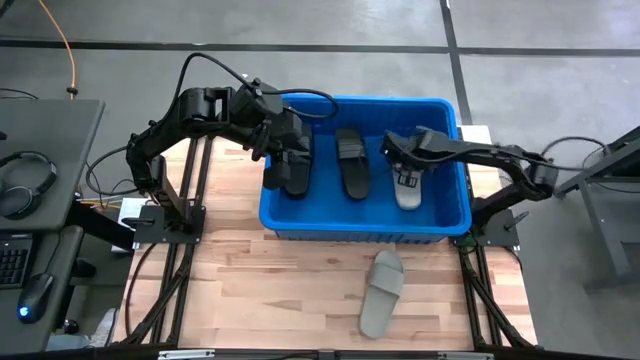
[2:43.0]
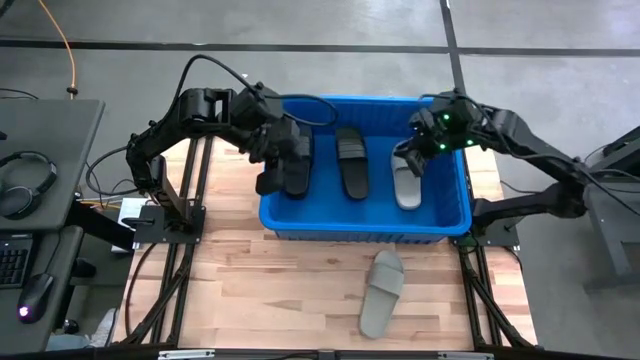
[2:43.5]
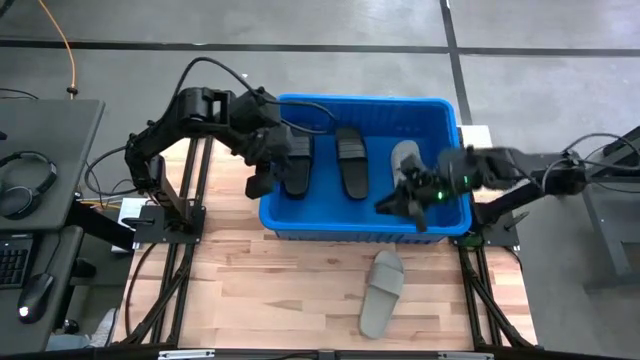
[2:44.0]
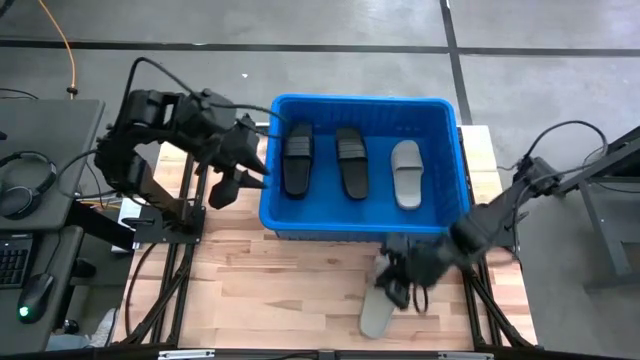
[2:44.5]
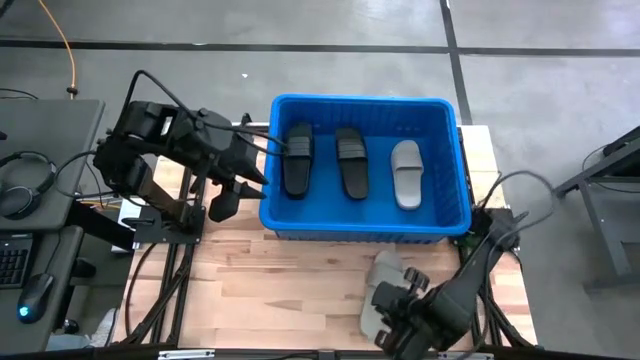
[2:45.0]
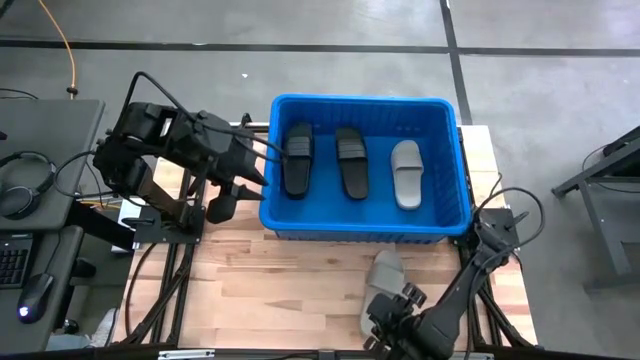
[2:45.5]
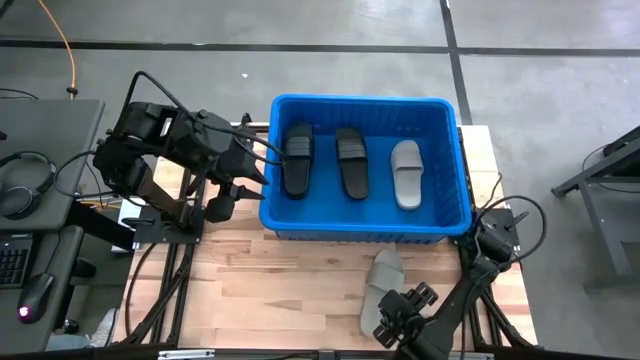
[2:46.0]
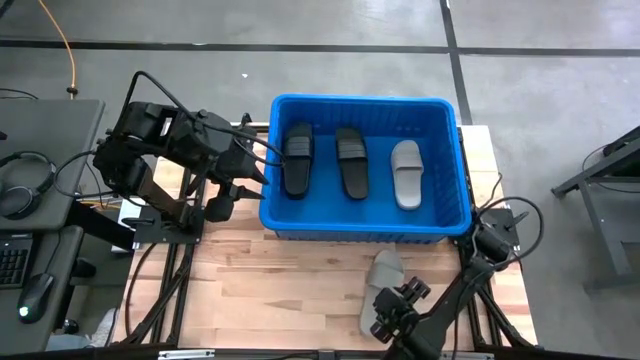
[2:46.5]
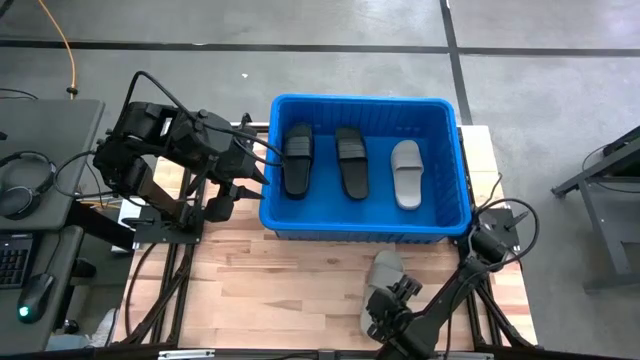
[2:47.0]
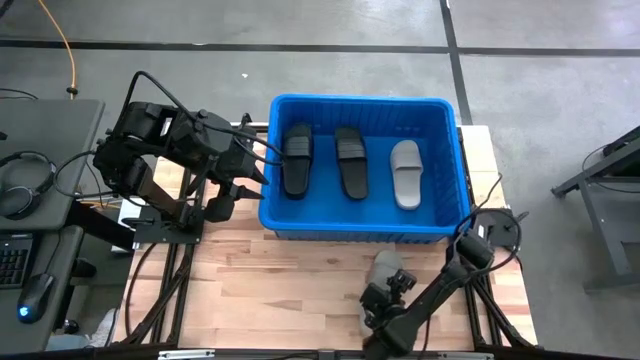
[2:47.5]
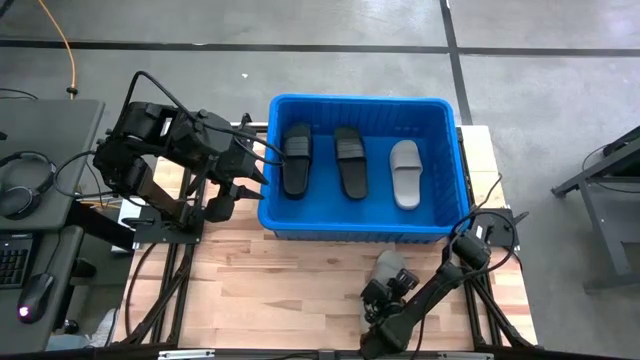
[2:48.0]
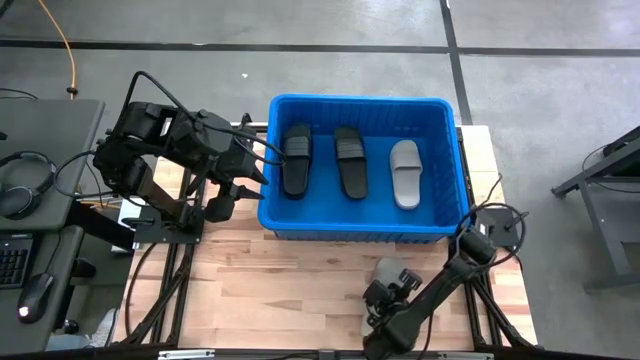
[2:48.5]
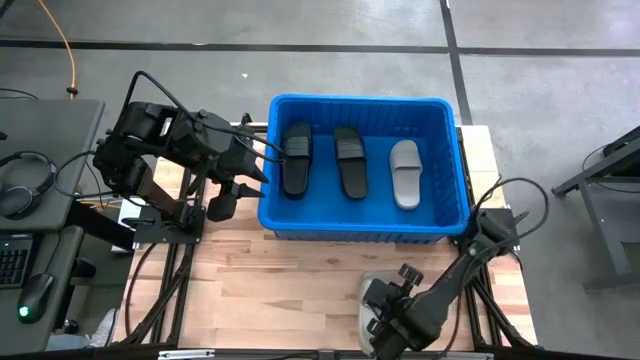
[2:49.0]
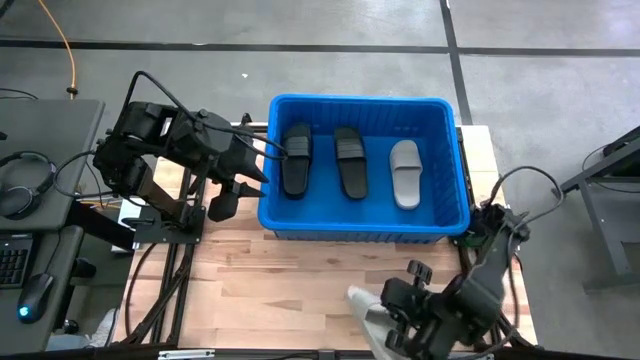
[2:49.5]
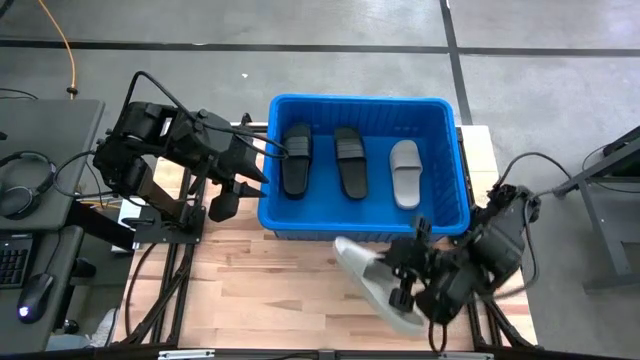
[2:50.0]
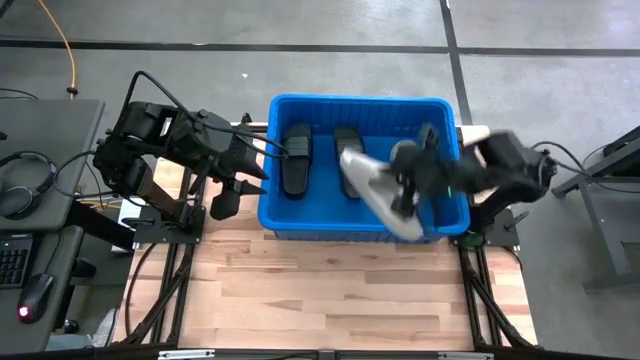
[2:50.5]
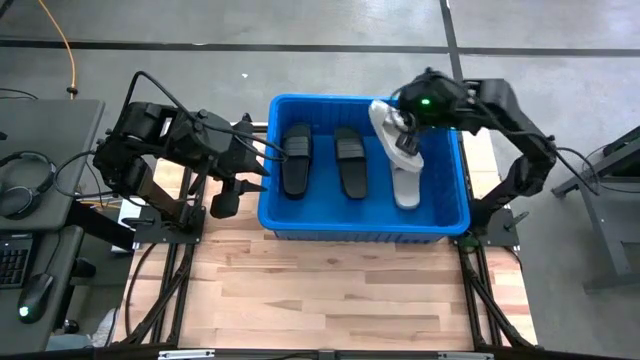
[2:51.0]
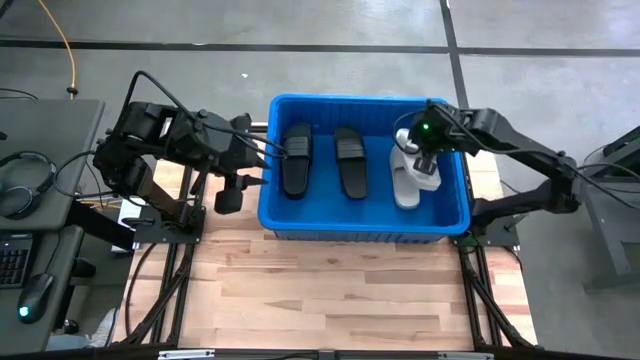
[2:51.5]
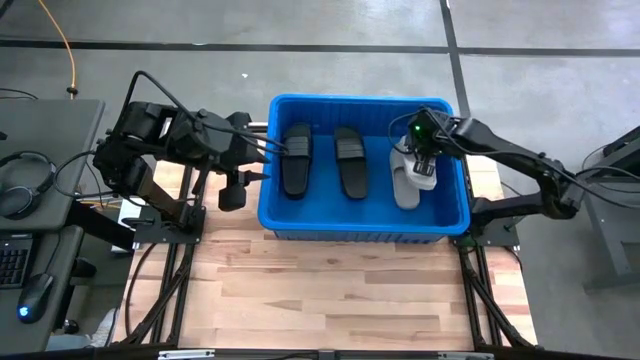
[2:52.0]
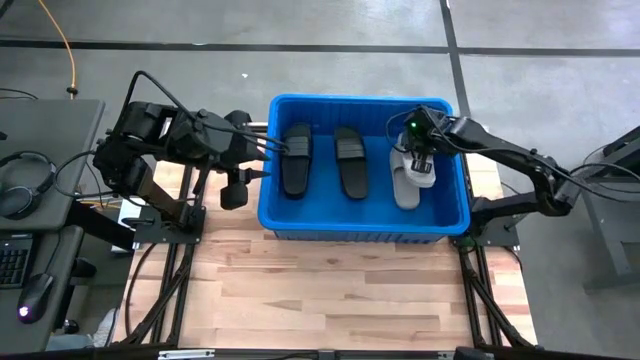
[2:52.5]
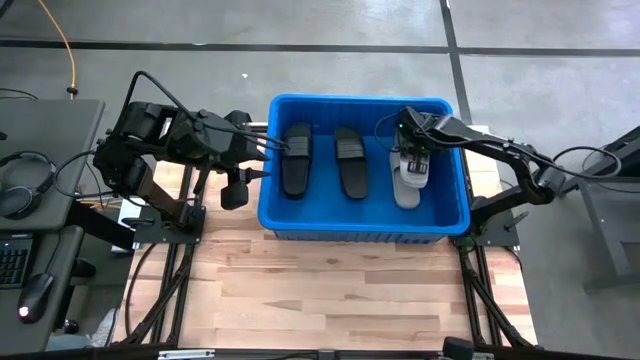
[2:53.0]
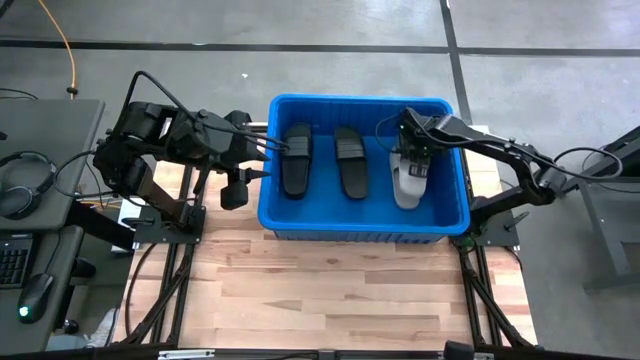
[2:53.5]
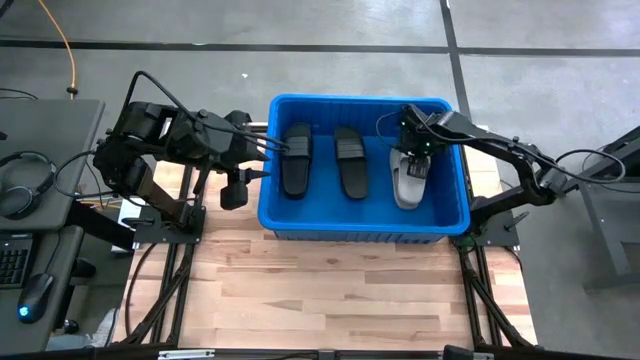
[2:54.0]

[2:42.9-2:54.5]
Task: Pick and place slides into bin
Put the gray slides on top of the gray slides into the blue bin

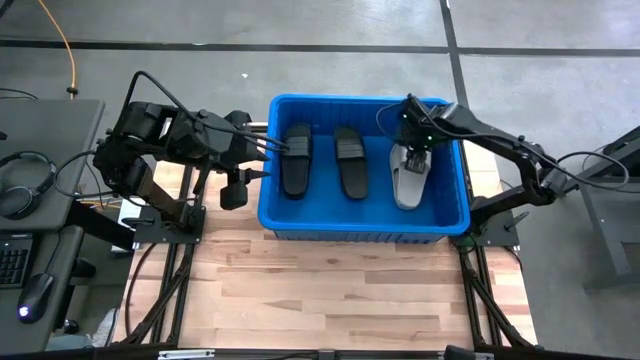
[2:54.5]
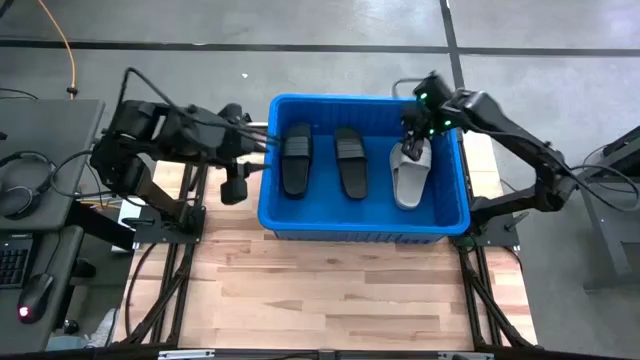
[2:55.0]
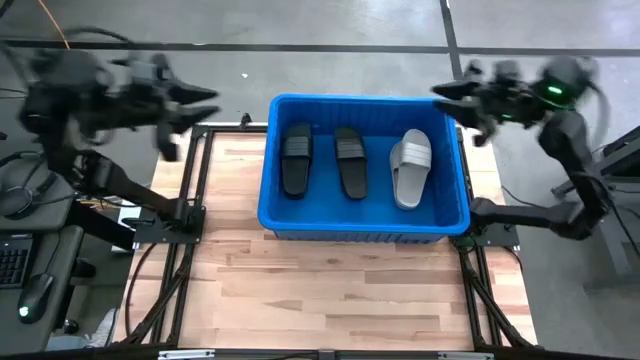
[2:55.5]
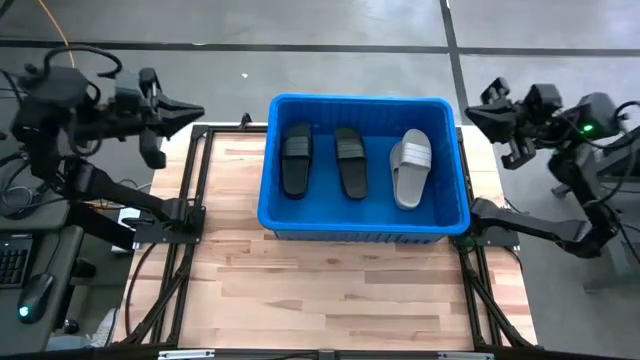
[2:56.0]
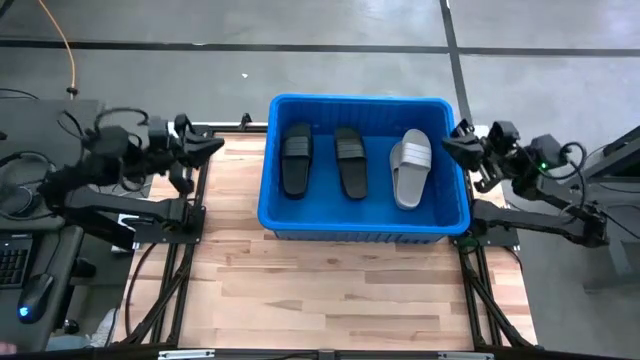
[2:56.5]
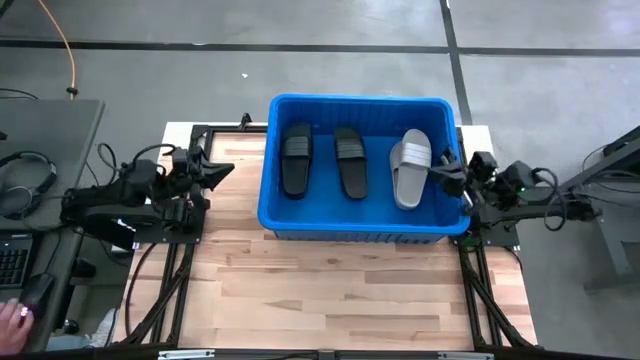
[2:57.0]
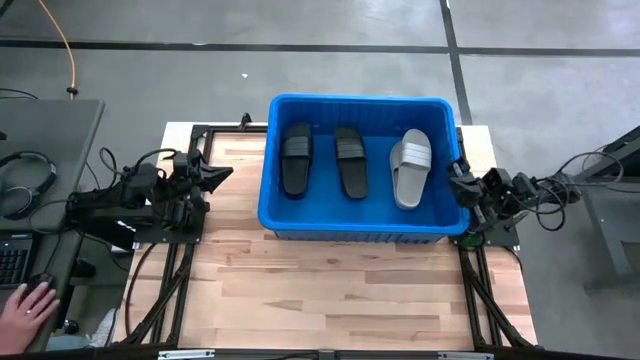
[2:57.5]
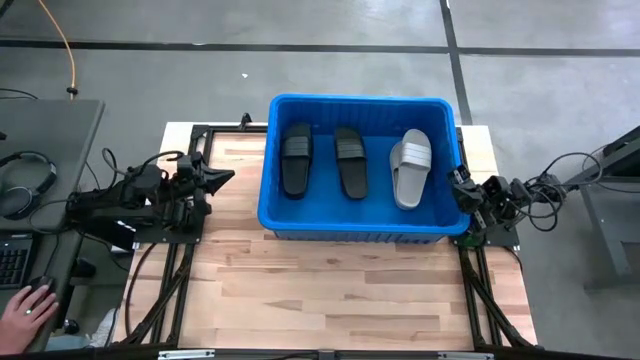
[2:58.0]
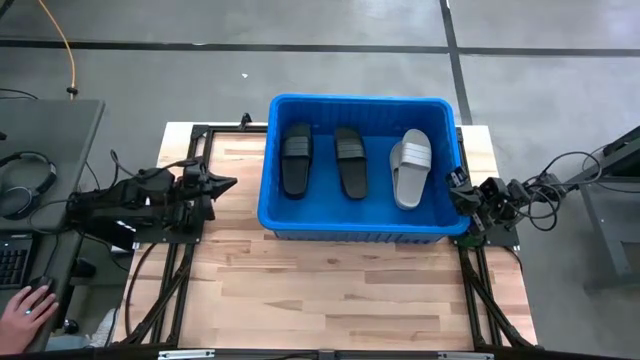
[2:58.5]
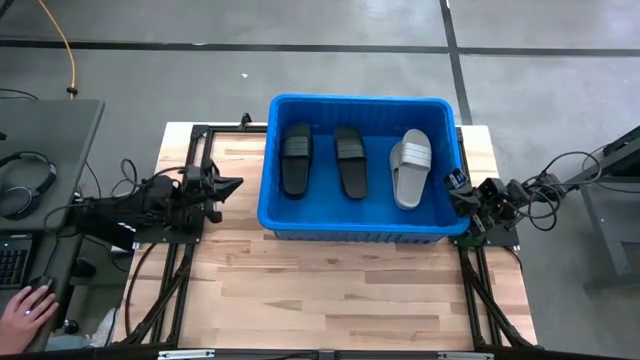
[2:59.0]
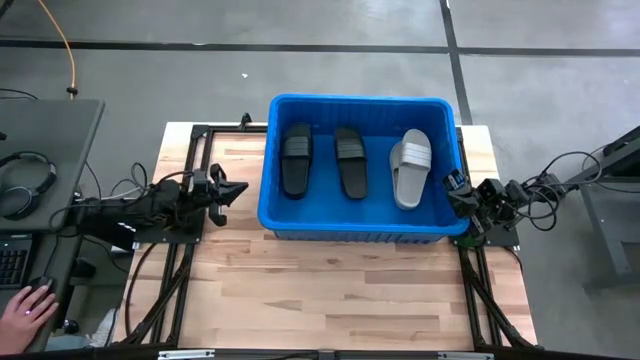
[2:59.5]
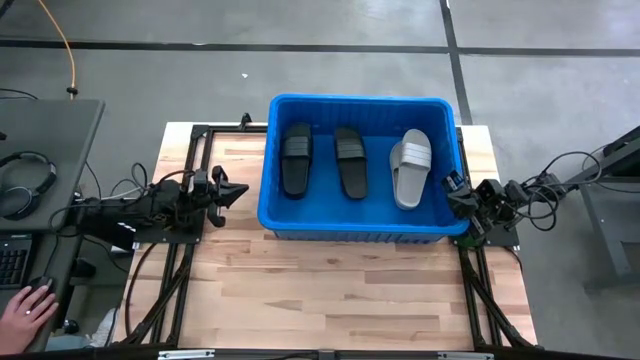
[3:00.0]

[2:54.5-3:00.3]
Return to Home Position

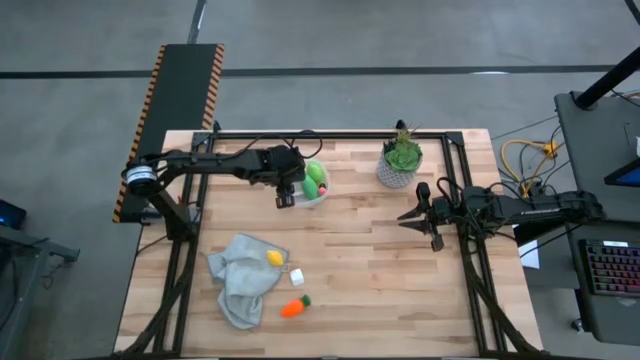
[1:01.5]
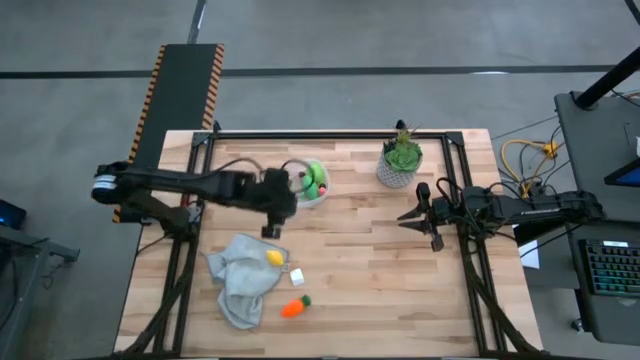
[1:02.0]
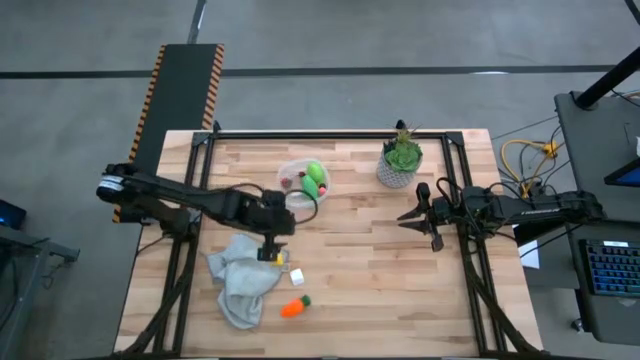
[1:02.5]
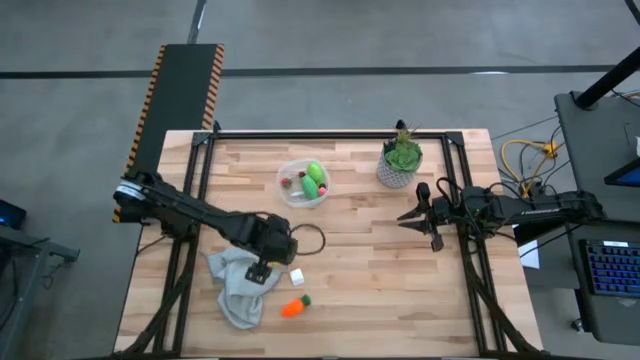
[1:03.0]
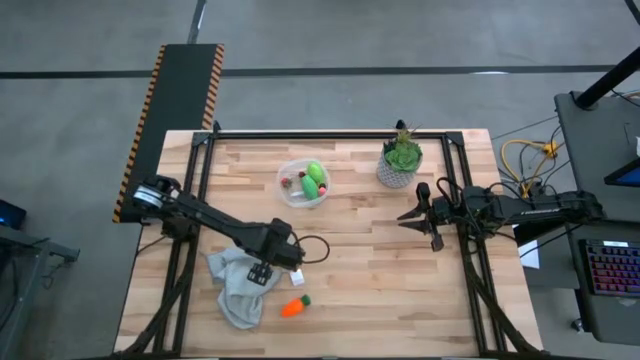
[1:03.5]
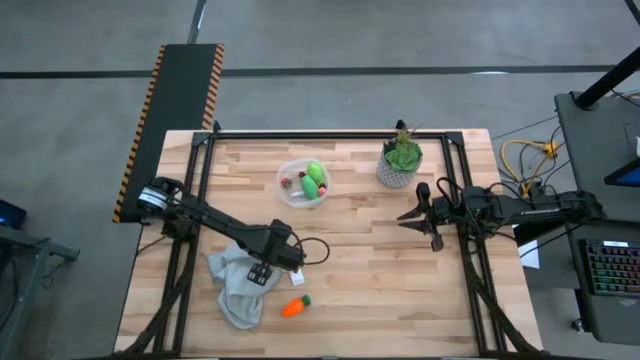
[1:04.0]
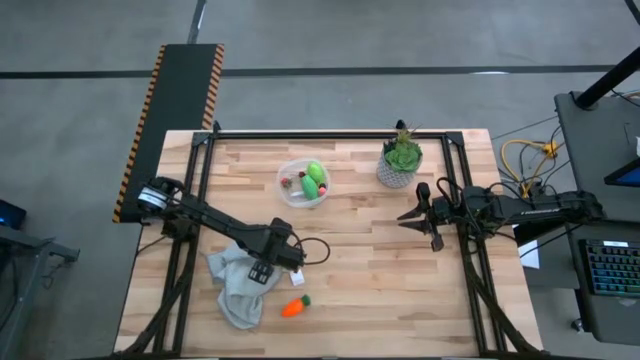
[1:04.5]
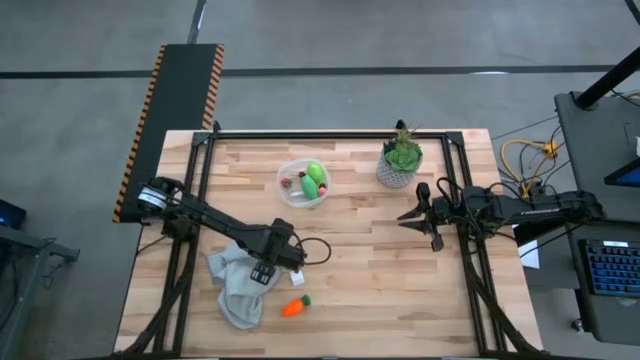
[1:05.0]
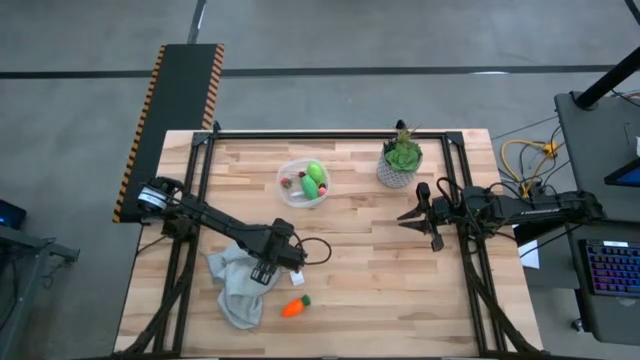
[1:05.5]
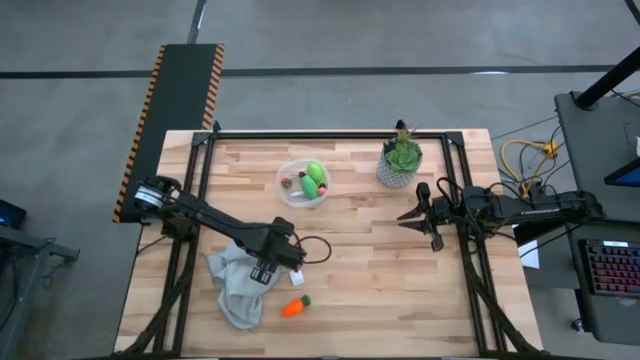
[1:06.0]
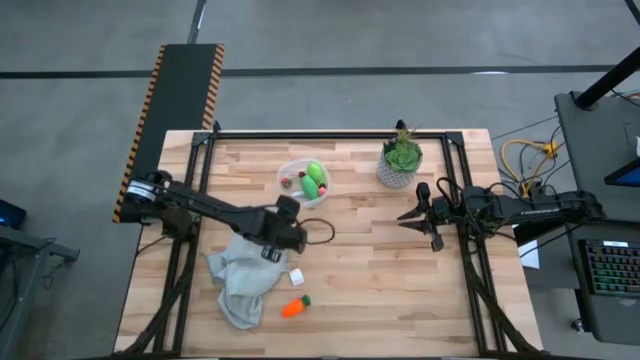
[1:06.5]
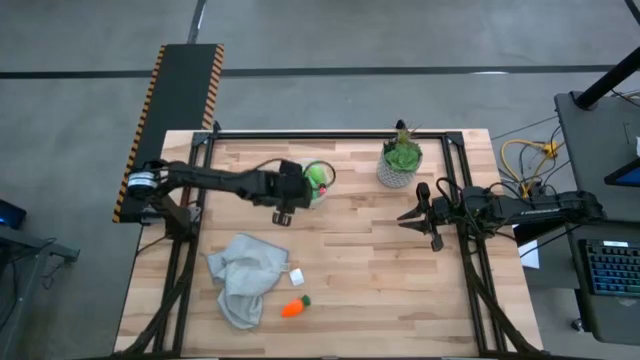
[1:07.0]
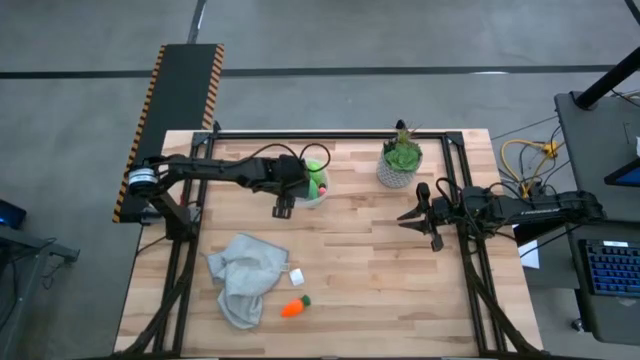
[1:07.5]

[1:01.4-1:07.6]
Task: Pick and placing Produce into tupperware
Put the yellow lemon into the transparent bin
